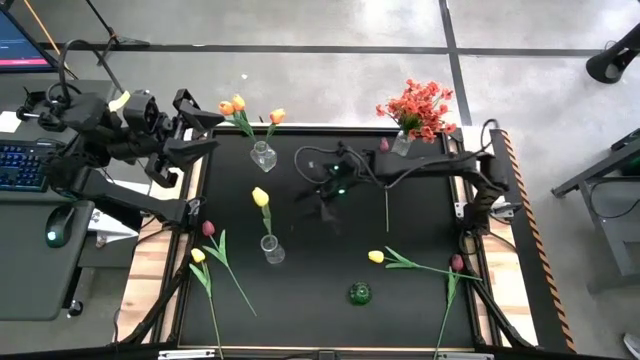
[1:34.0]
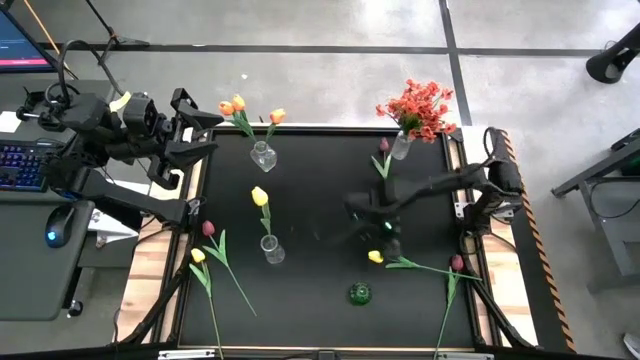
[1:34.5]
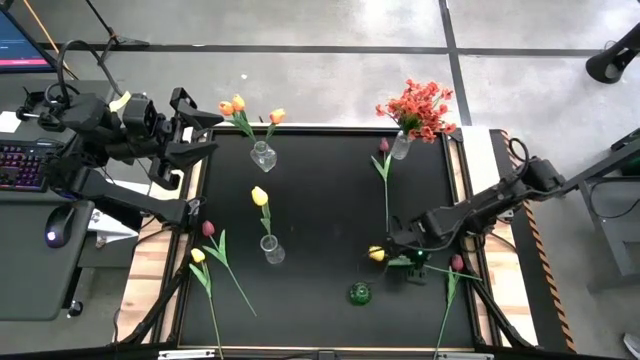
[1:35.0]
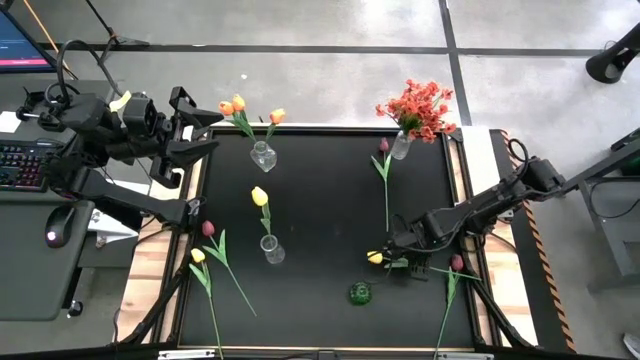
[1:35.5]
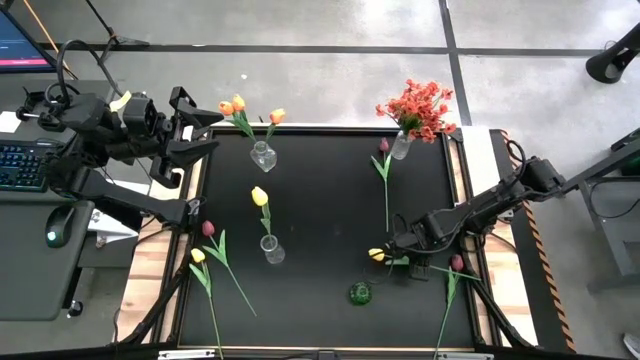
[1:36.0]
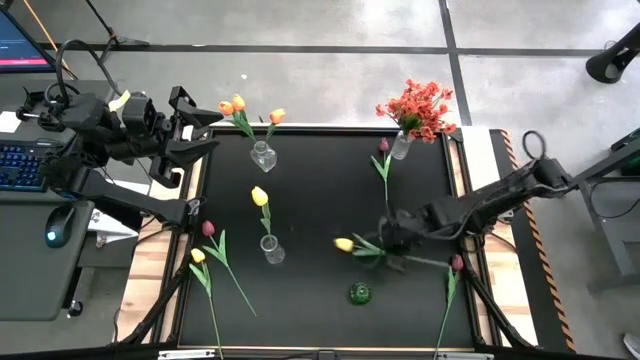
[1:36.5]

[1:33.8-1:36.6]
Task: Sort flowers into vase by color
Put the right yellow flower into the bottom left transparent vase

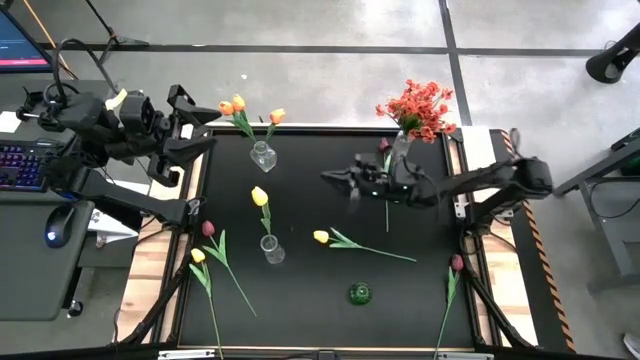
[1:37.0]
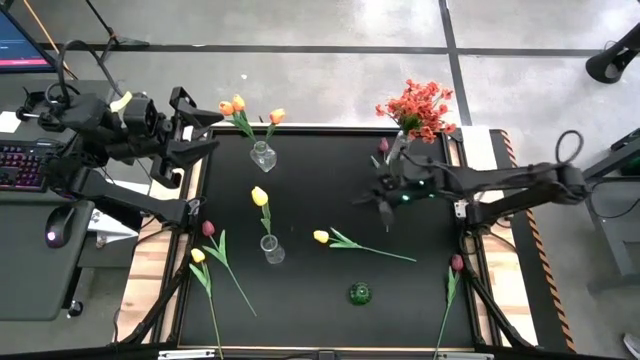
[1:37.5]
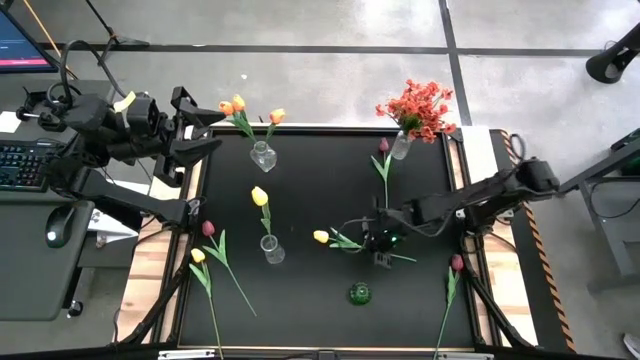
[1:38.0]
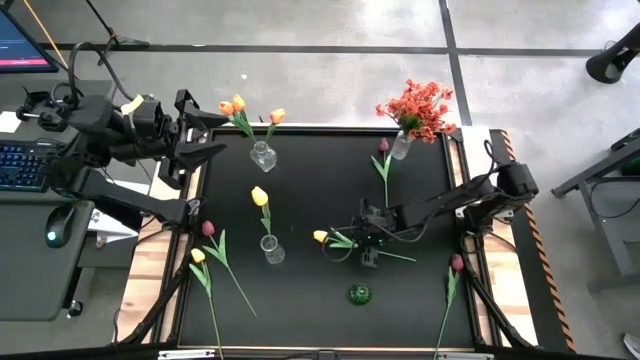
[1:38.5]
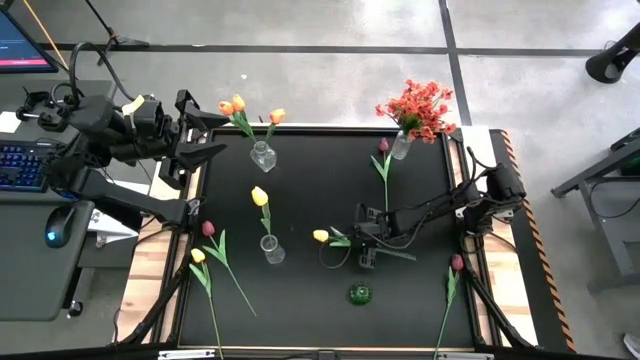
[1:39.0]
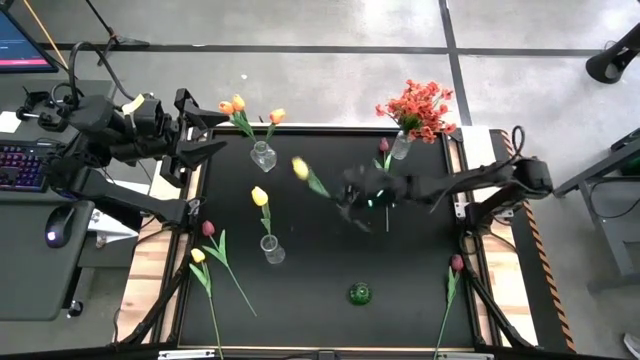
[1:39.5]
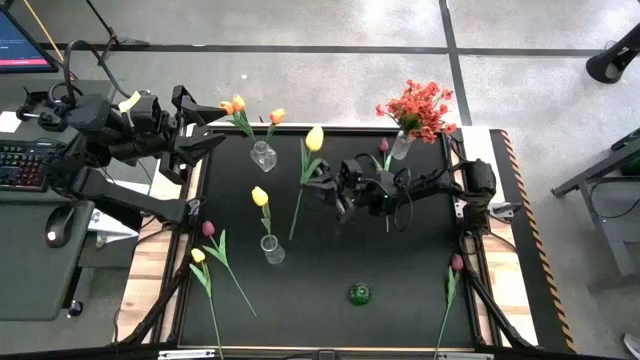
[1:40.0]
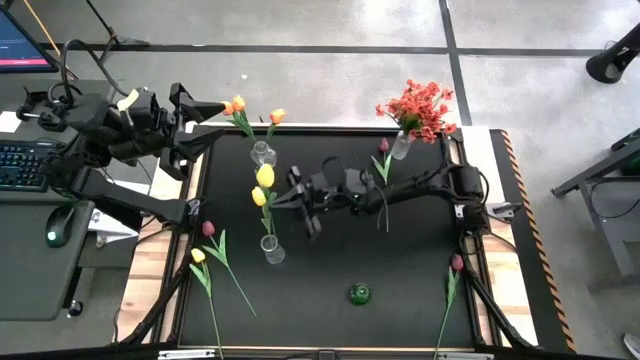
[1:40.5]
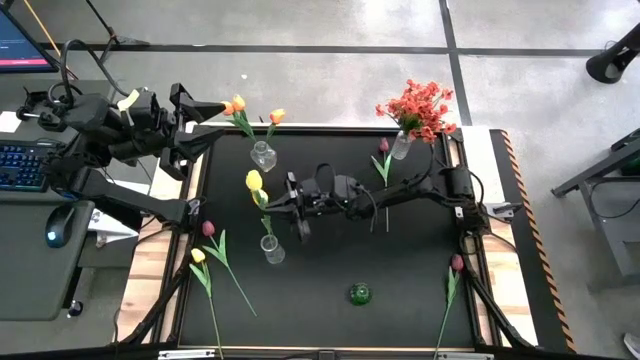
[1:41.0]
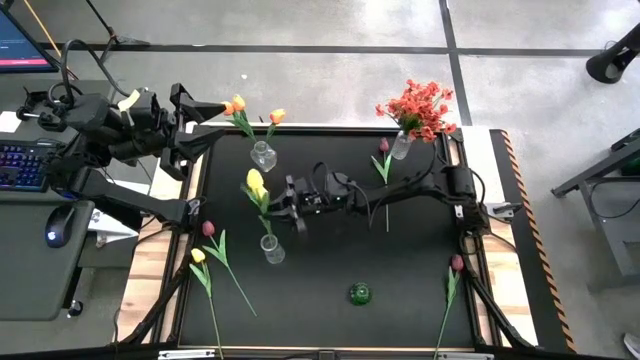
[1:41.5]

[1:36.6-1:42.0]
Put the right yellow flower into the bottom left transparent vase

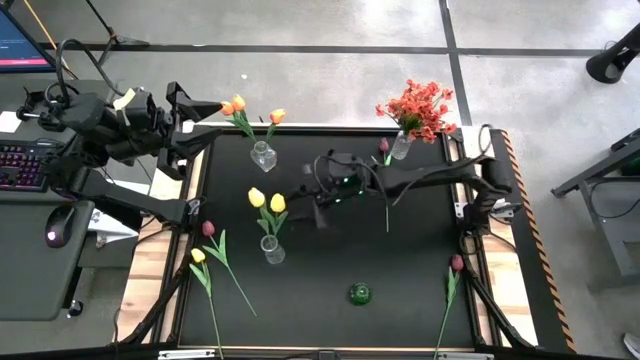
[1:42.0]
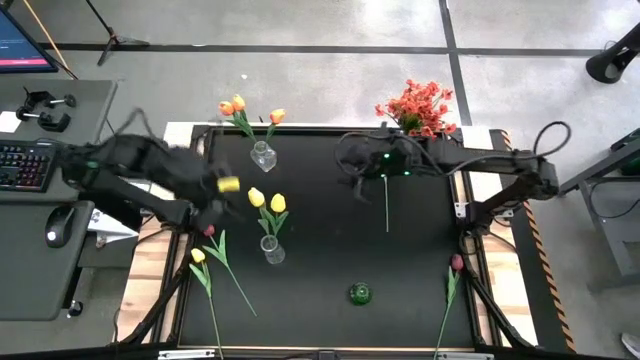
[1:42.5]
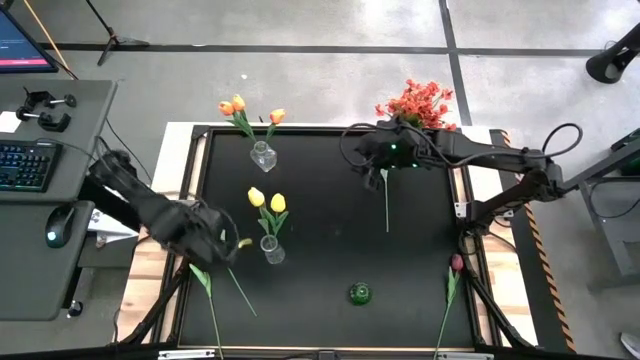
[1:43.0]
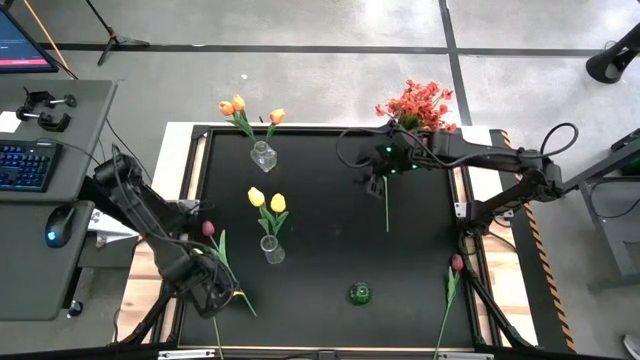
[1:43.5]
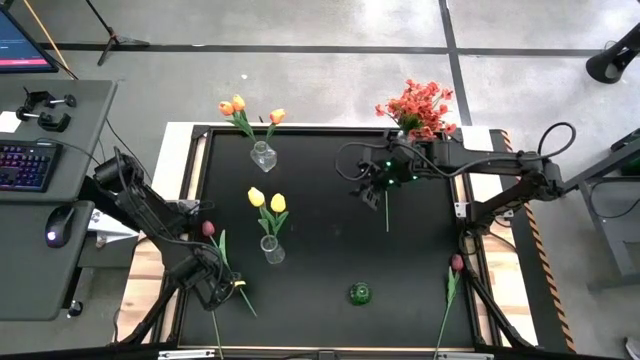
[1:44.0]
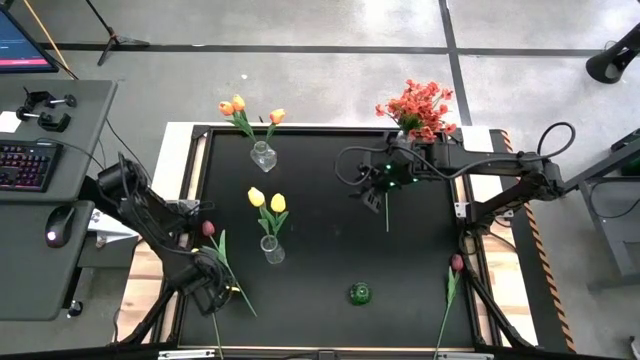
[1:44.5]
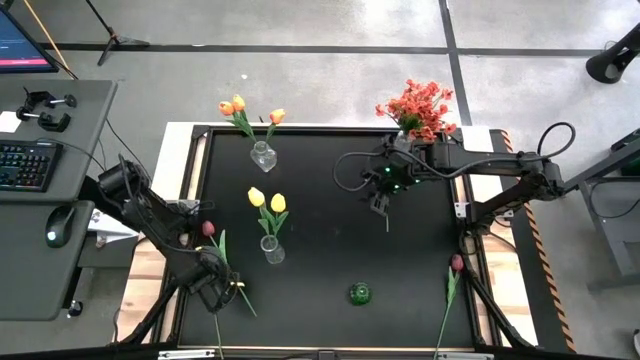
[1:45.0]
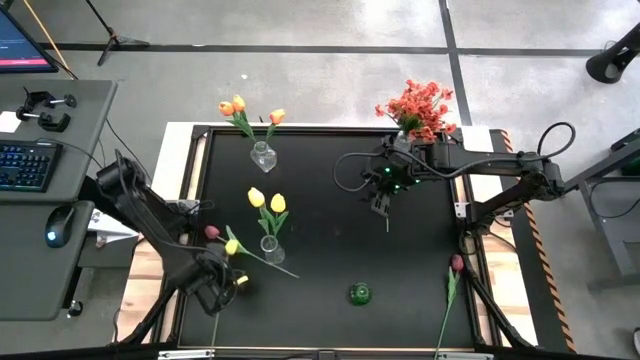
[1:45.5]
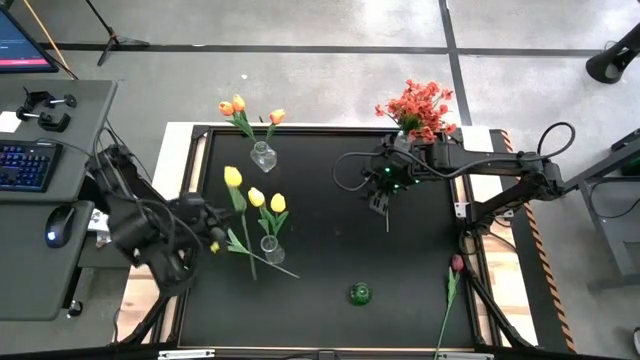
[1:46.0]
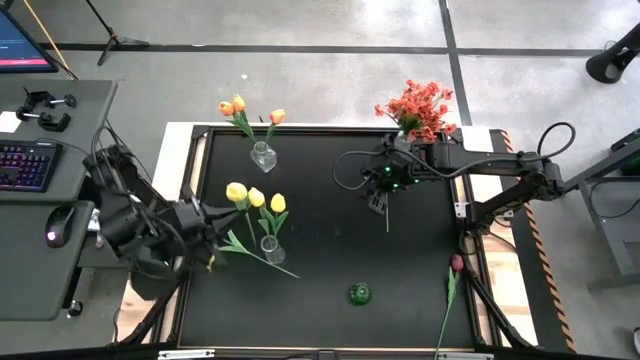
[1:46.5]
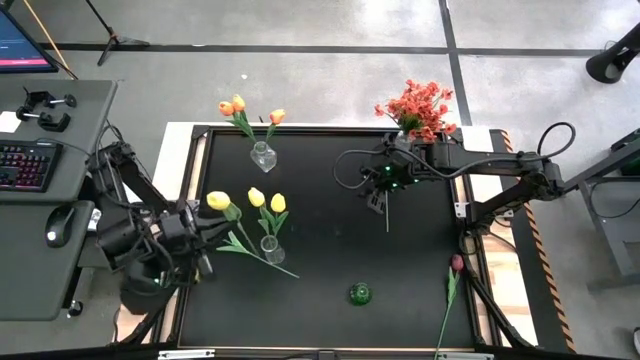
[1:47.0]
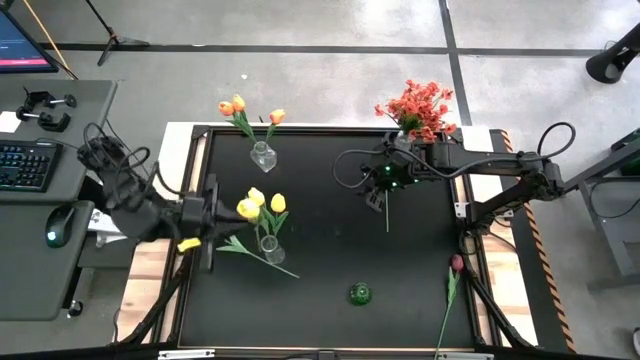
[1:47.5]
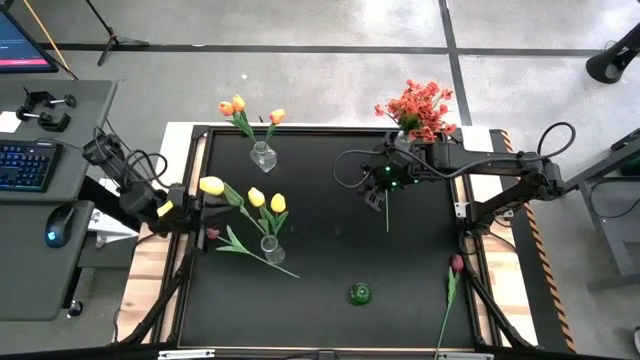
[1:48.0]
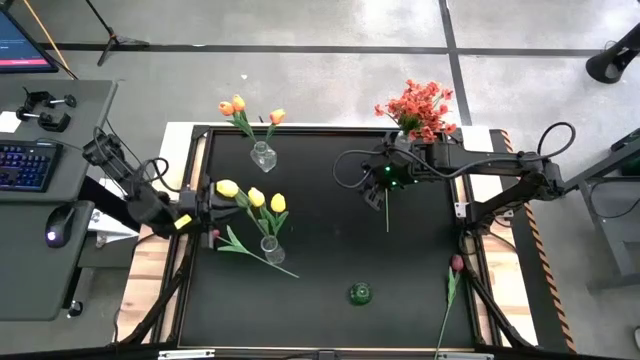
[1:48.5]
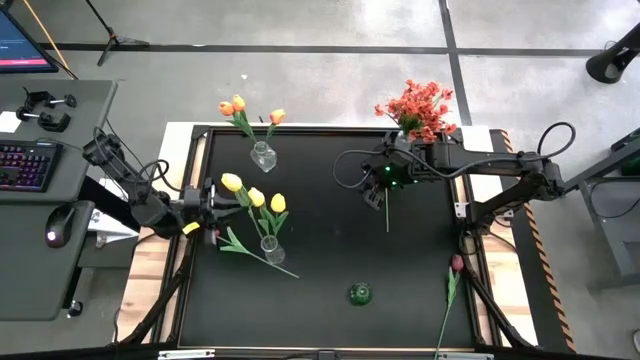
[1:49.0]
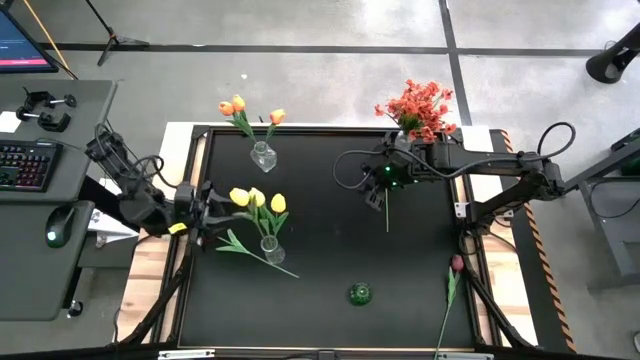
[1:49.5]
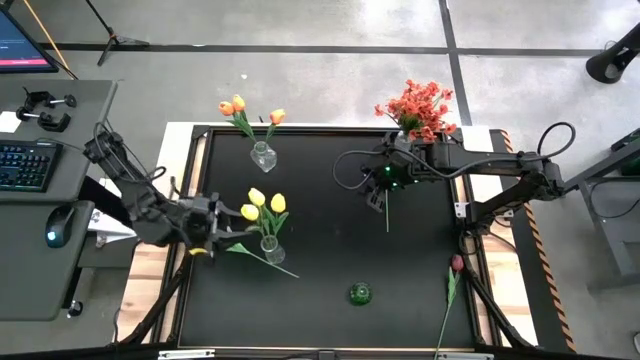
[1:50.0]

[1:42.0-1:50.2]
Put the yellow flower into the bottom left transparent vase

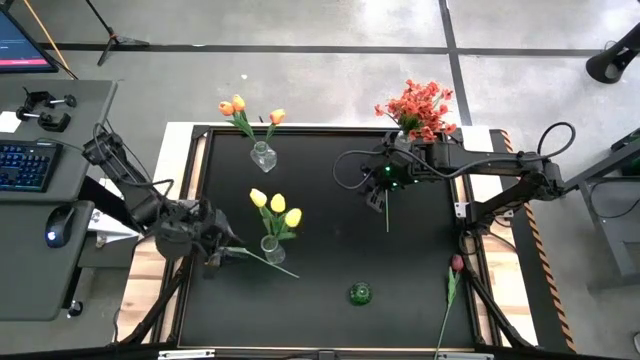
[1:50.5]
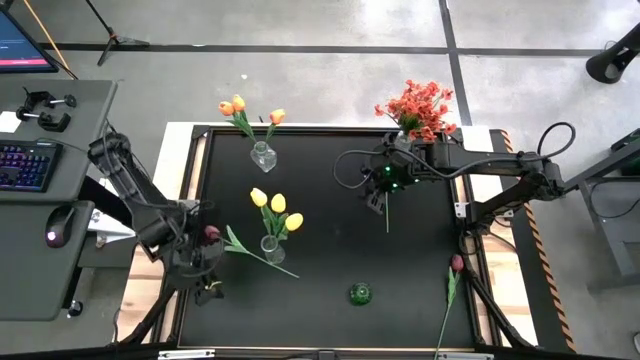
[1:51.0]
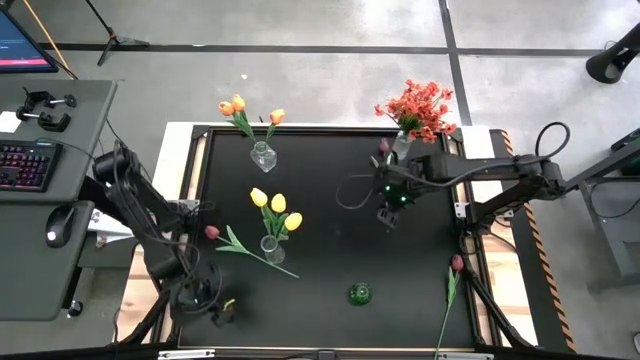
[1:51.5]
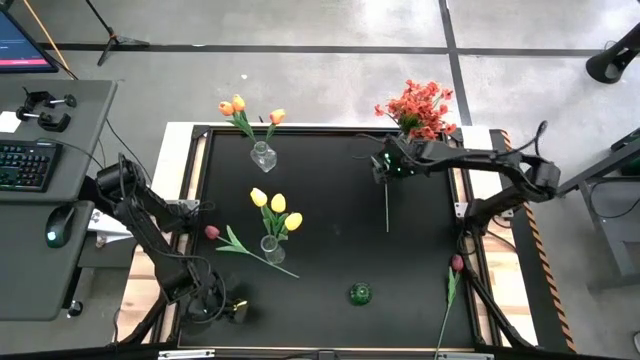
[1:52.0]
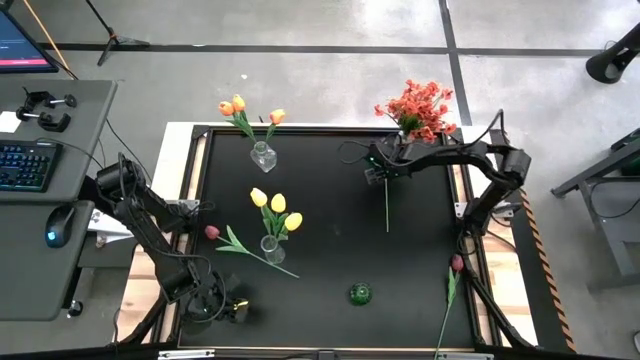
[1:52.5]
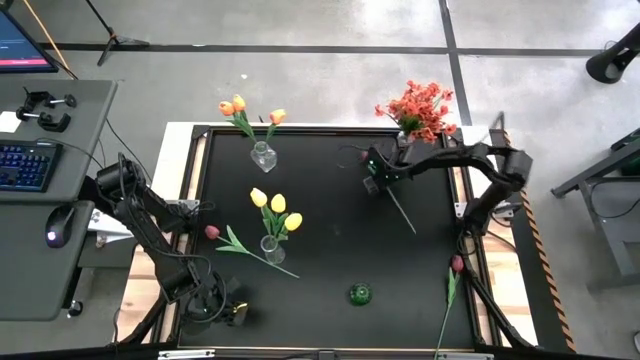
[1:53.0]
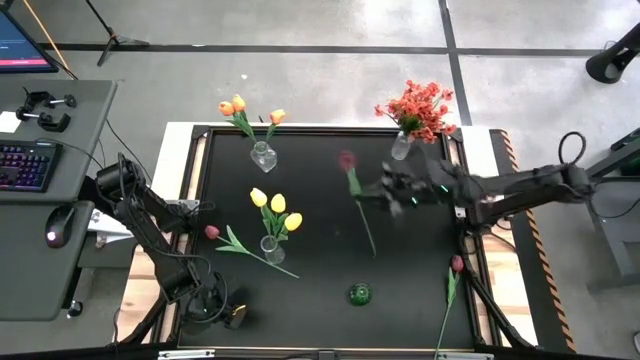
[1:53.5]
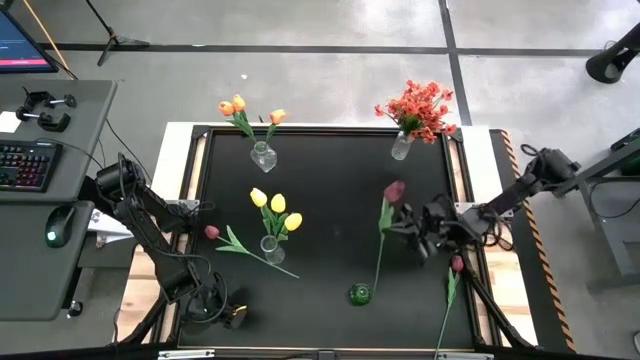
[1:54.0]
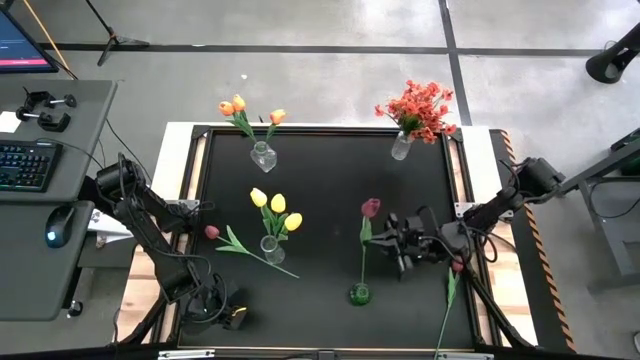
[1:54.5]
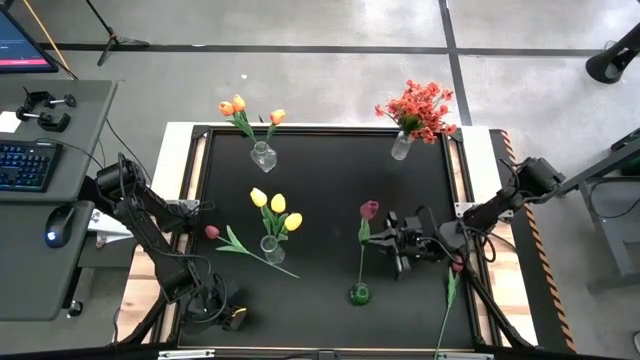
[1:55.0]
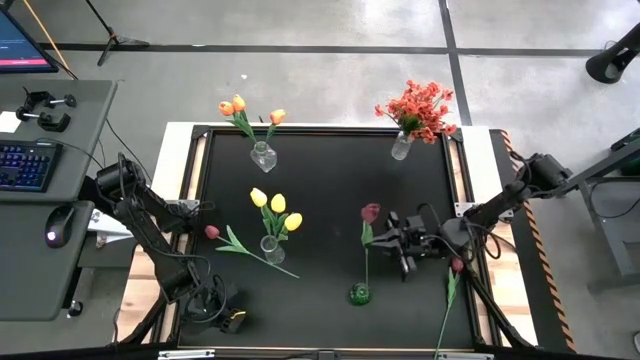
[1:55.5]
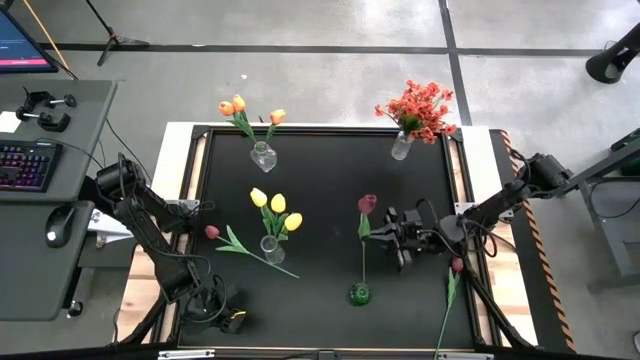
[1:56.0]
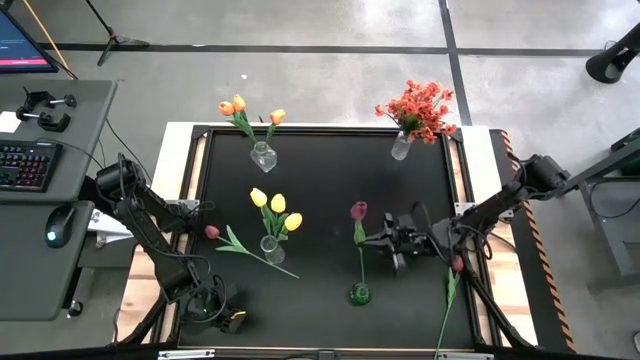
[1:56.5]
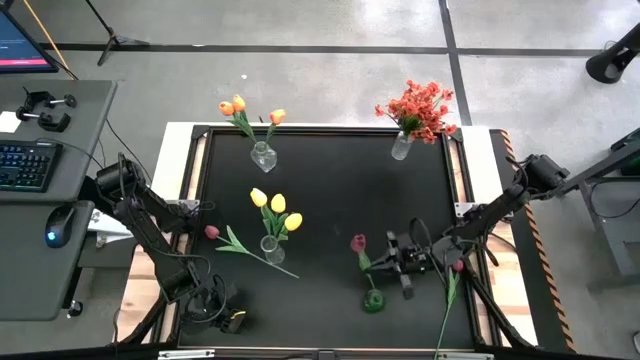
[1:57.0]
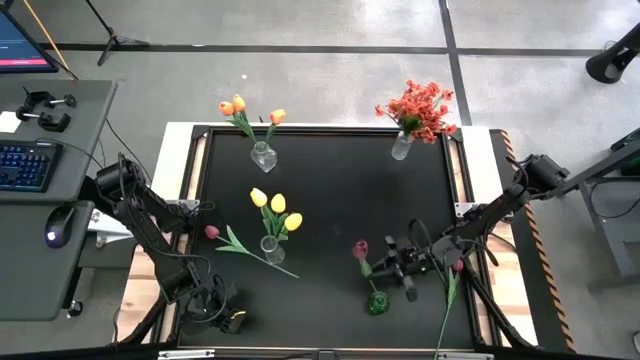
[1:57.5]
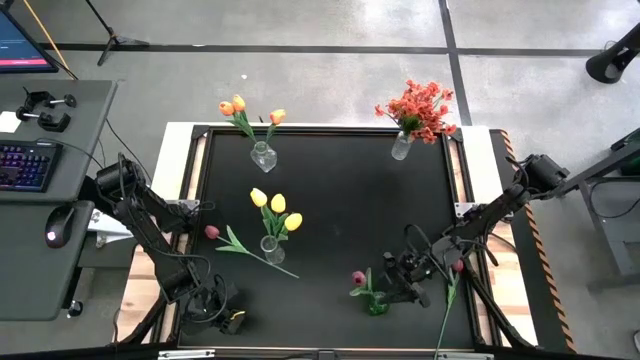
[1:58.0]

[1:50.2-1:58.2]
Put the top dark red flower into the green vase
